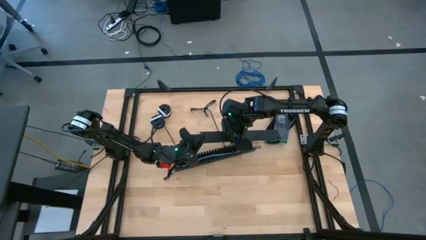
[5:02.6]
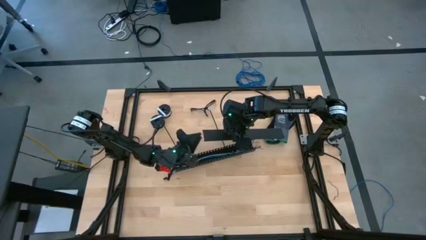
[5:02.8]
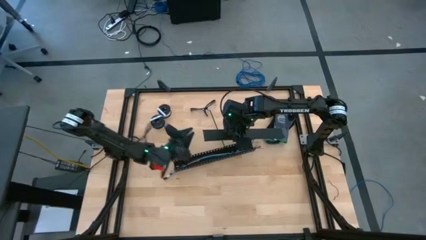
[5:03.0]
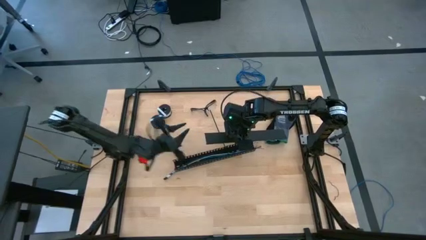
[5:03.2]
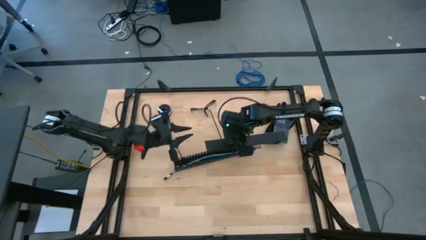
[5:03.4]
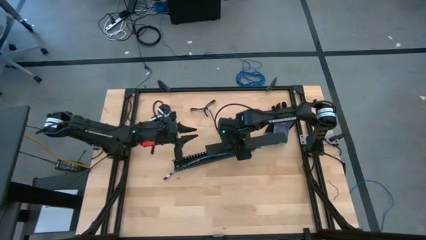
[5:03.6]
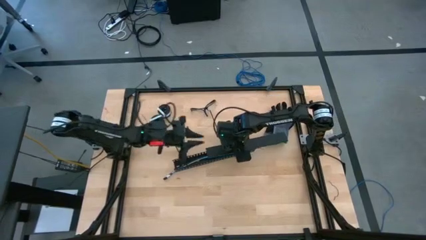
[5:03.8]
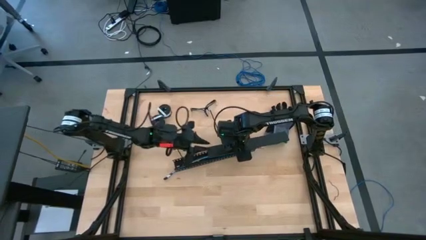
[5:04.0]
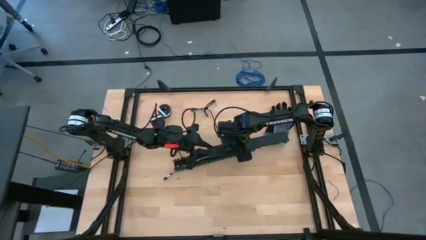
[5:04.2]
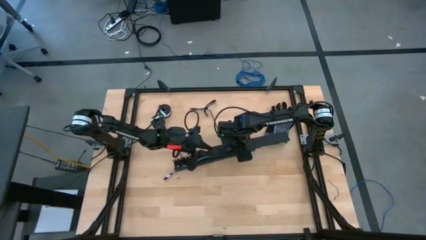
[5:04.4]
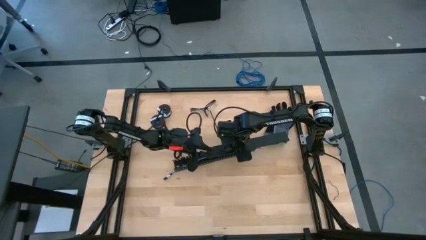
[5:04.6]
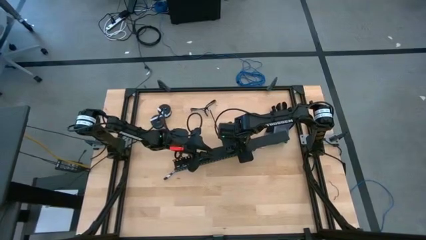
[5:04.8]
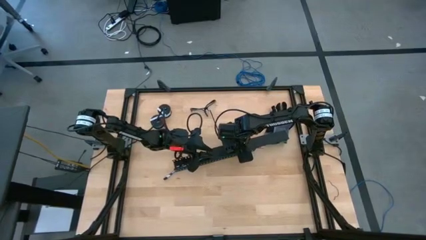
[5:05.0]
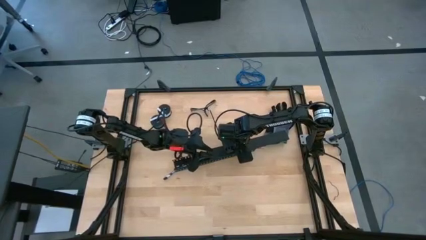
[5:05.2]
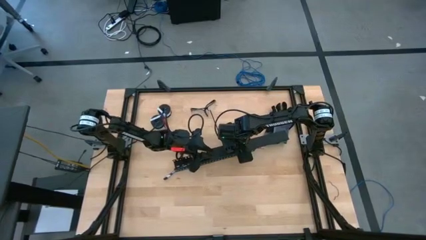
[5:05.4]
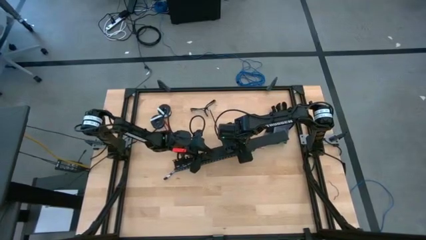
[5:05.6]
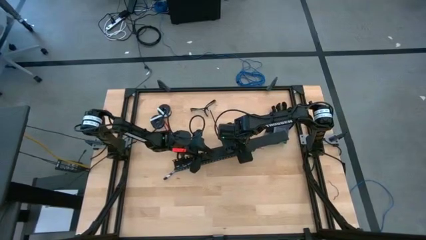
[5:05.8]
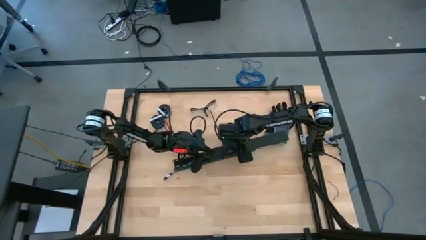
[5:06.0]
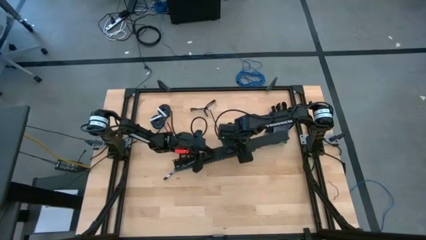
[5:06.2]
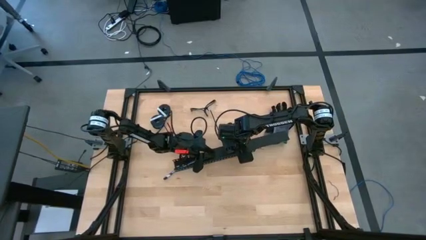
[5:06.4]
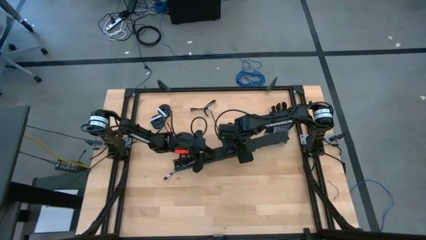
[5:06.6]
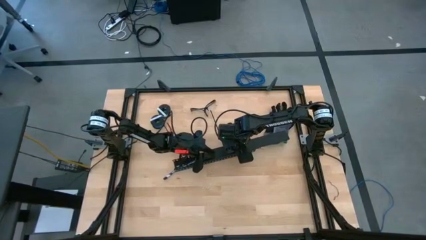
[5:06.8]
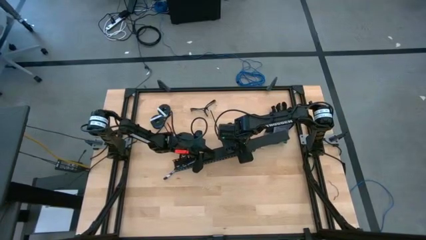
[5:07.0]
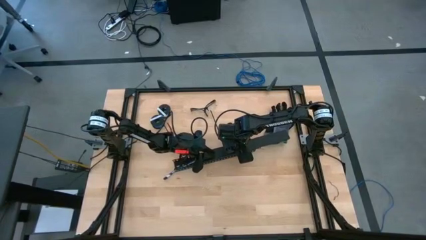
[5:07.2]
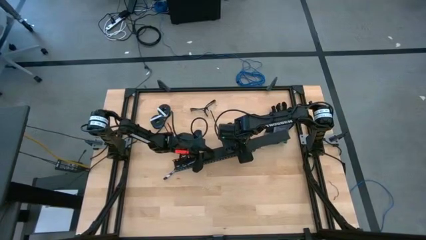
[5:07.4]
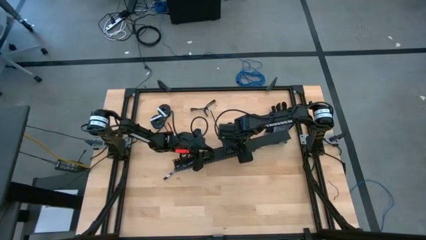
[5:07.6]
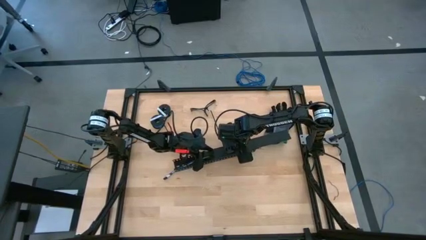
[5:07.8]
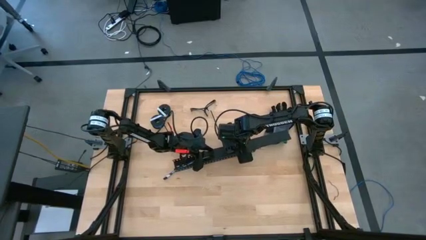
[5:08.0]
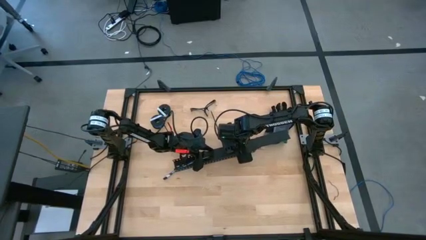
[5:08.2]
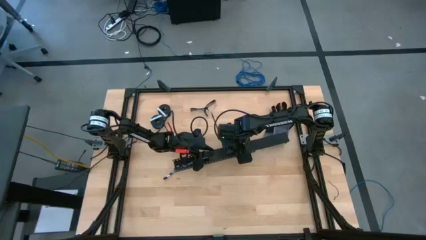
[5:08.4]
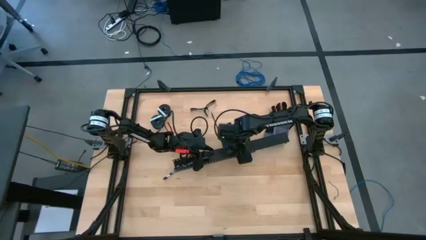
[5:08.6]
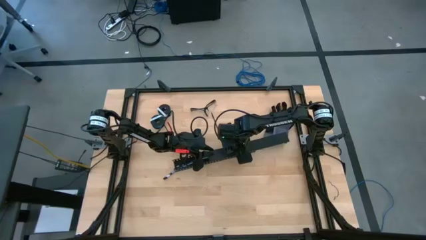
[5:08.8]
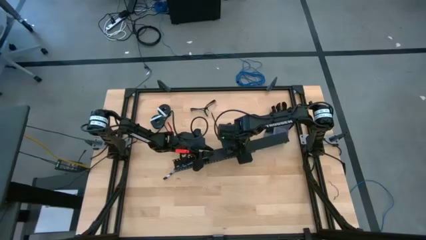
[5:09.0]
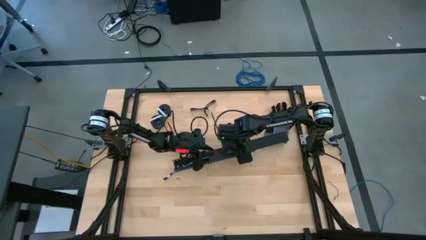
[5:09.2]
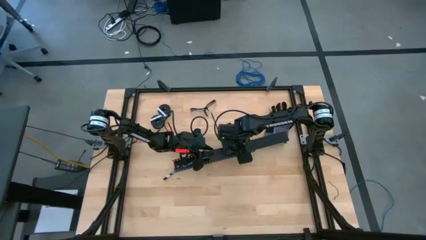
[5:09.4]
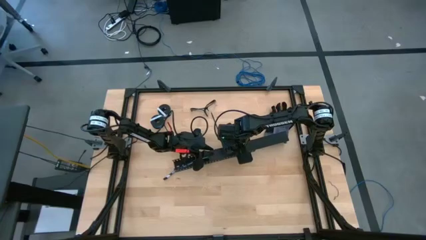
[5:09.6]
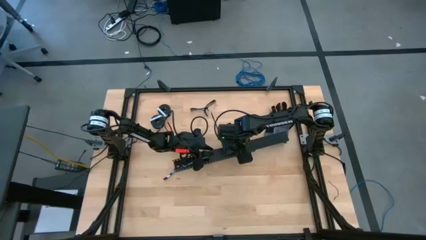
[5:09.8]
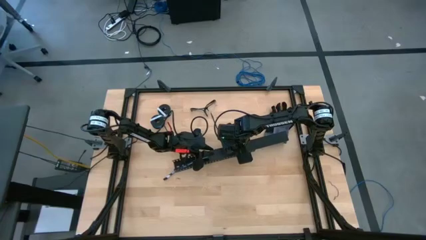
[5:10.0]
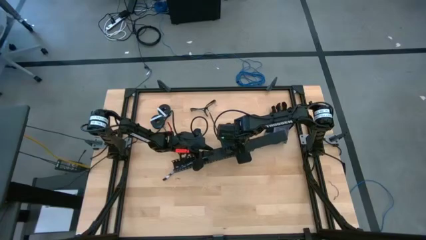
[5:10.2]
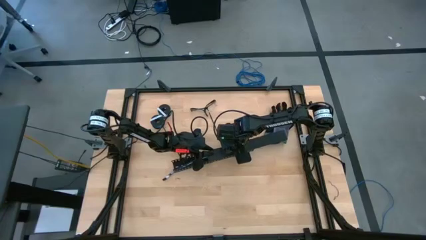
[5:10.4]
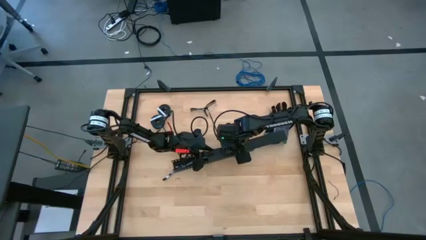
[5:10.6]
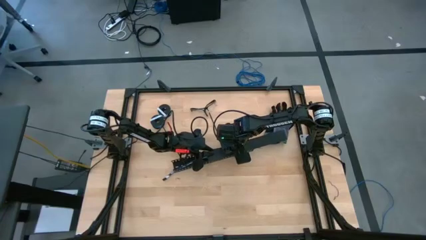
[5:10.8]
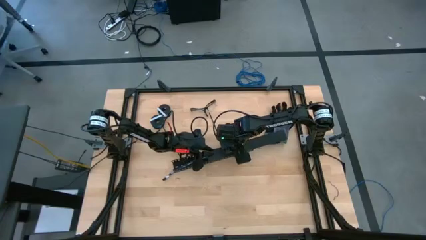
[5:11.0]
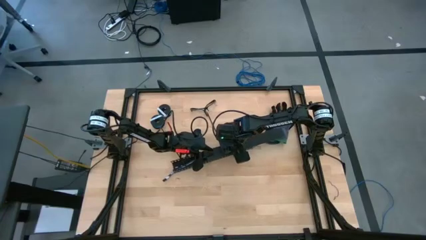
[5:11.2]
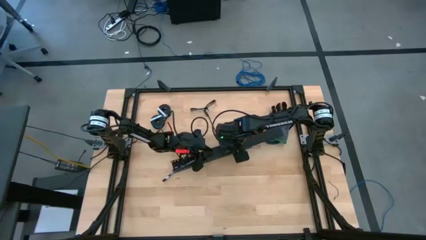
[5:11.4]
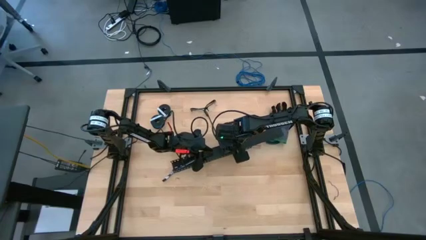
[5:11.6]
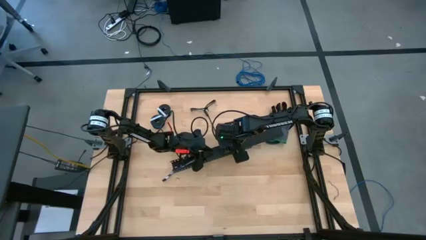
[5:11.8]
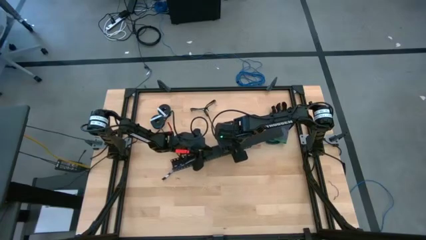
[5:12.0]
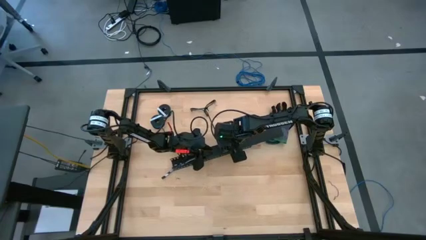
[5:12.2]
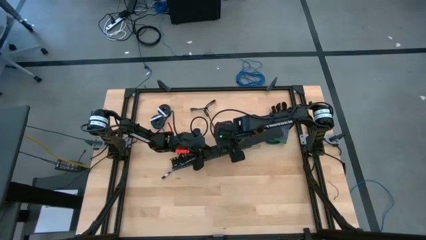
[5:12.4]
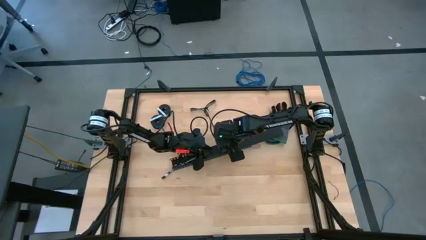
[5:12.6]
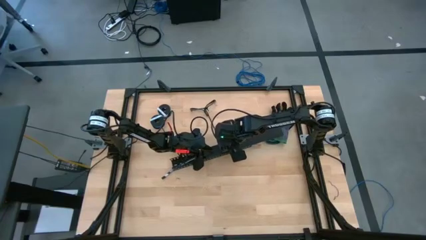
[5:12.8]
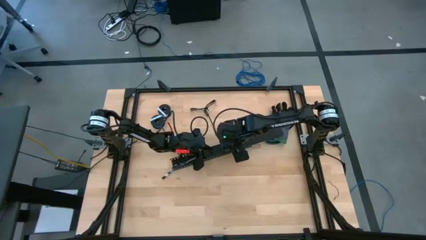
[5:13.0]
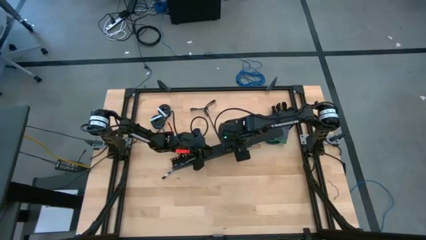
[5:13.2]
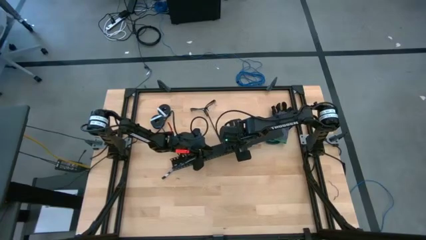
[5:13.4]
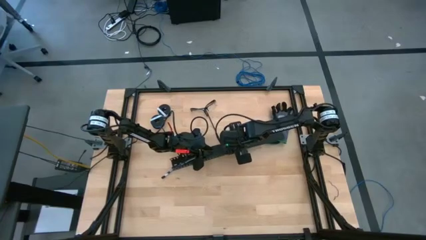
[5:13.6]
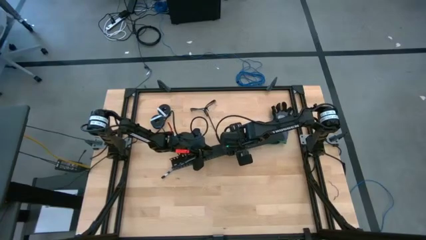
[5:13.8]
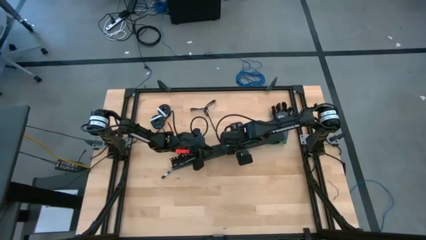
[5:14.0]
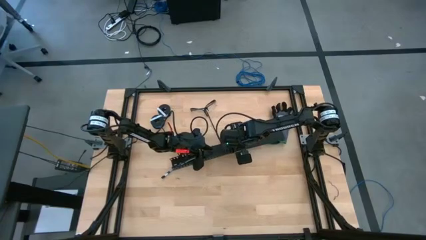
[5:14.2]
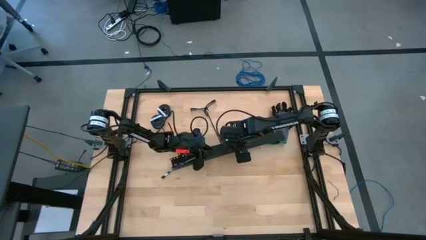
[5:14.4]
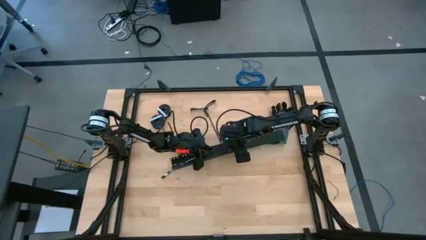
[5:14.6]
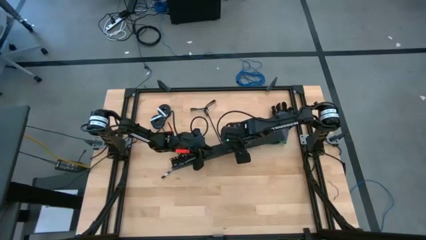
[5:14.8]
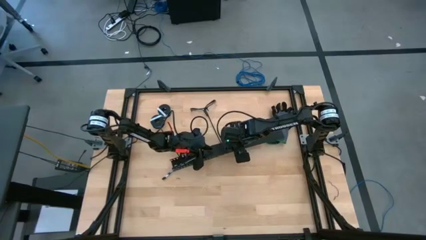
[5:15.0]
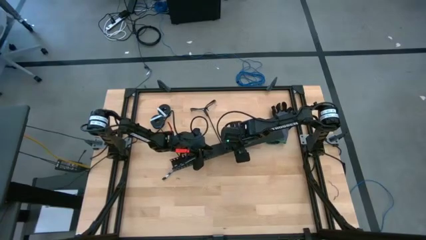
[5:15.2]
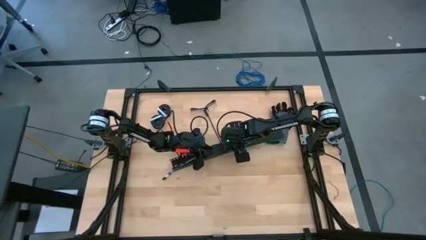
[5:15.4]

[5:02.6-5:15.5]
Task: Ziptie cables
Insert the black cover of the black cable duct

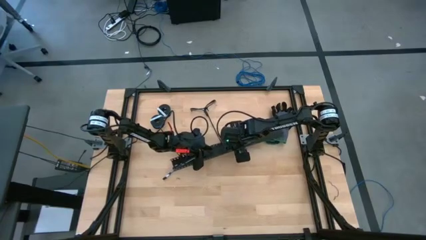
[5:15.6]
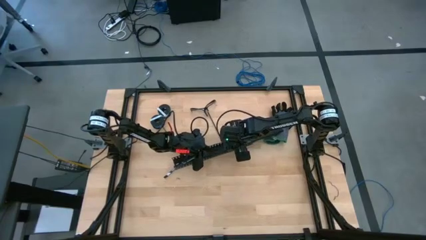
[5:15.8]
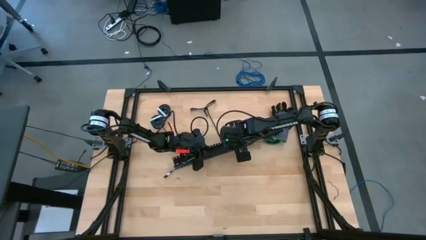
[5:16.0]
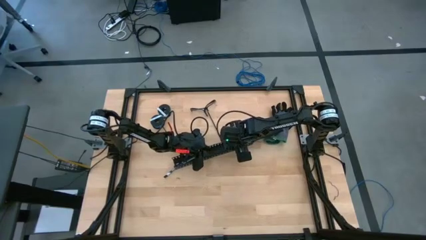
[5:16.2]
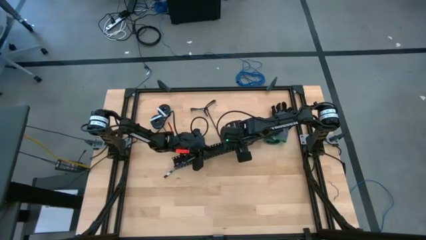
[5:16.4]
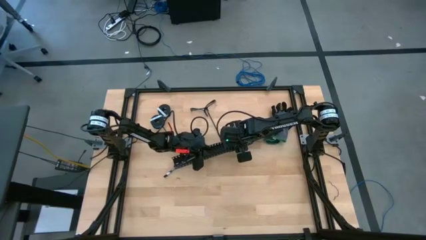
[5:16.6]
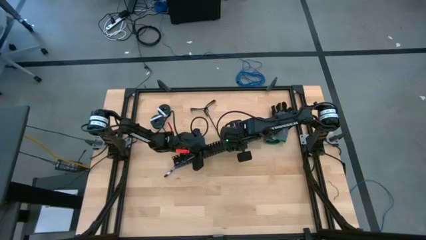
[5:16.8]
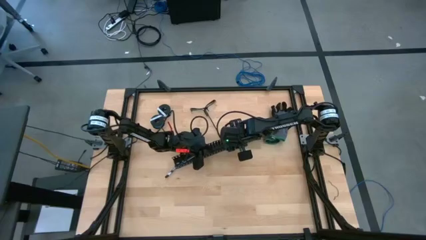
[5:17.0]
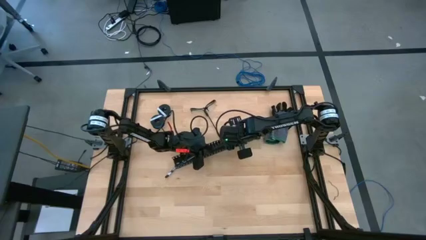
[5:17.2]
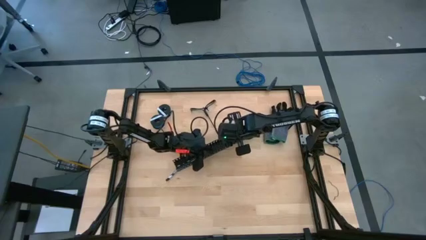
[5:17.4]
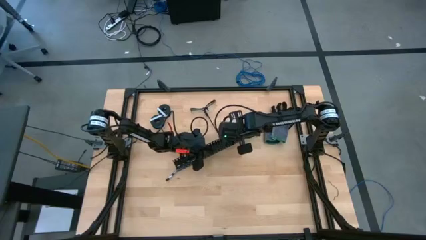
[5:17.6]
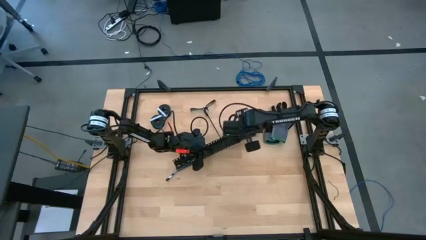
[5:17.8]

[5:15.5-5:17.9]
Insert the black cover of the black cable duct
